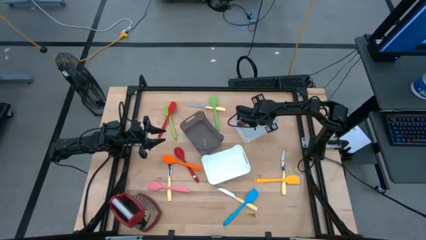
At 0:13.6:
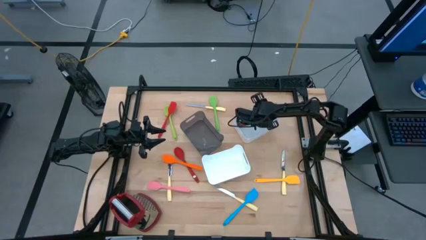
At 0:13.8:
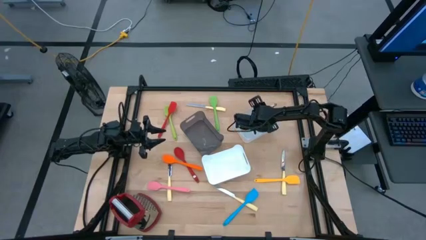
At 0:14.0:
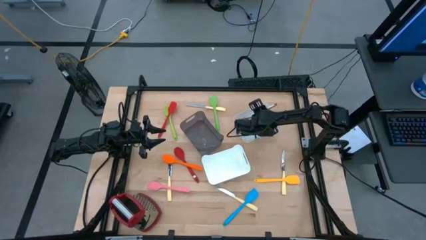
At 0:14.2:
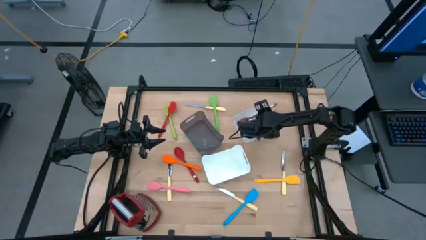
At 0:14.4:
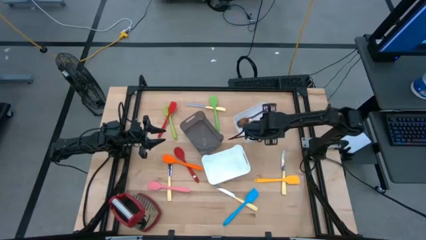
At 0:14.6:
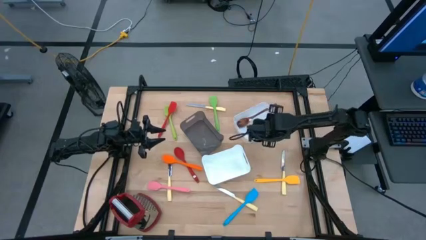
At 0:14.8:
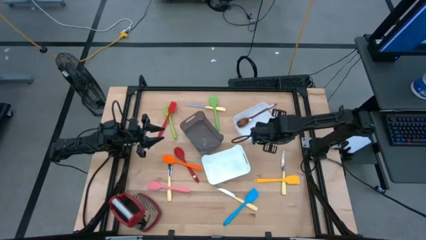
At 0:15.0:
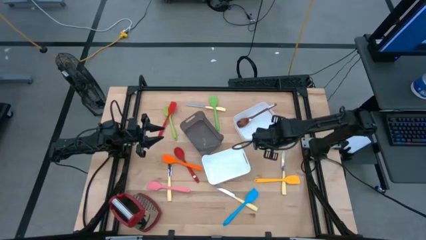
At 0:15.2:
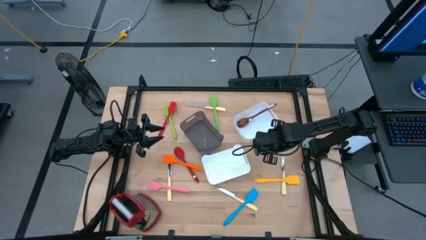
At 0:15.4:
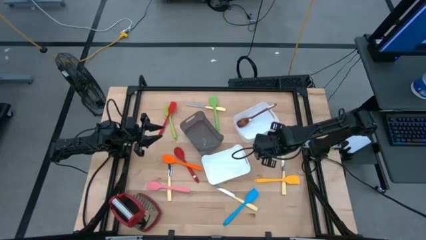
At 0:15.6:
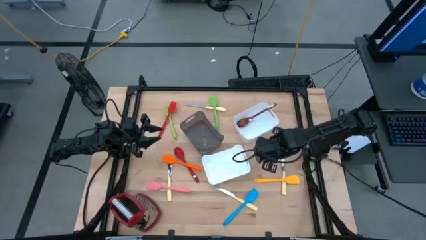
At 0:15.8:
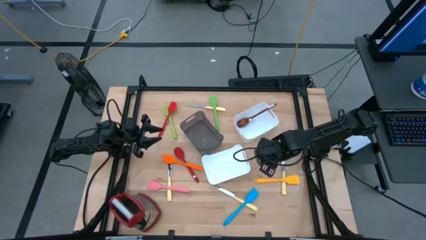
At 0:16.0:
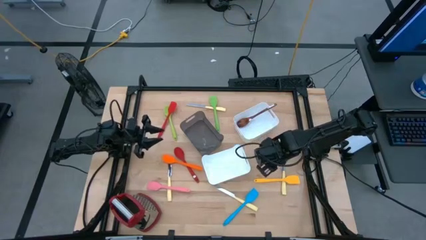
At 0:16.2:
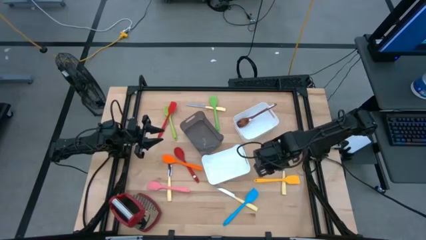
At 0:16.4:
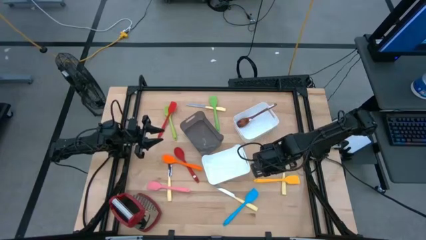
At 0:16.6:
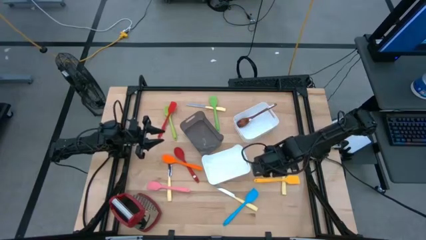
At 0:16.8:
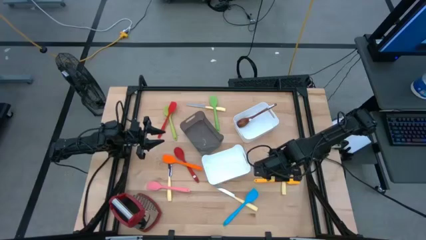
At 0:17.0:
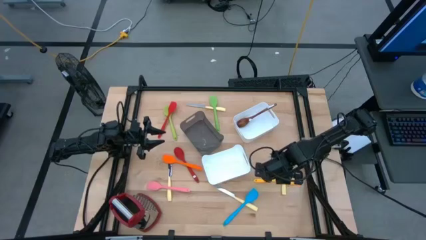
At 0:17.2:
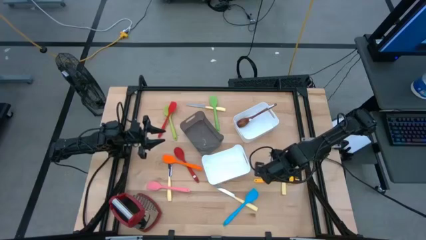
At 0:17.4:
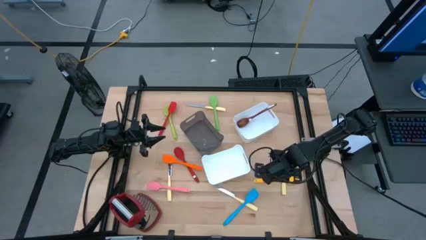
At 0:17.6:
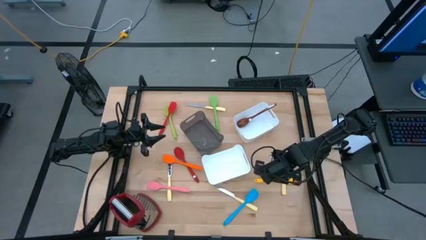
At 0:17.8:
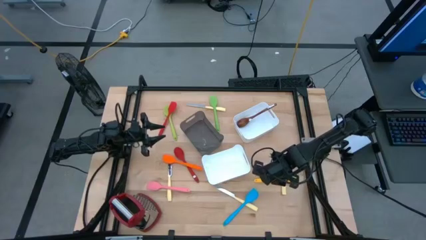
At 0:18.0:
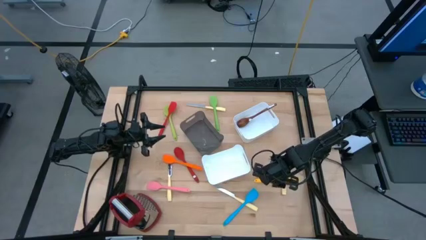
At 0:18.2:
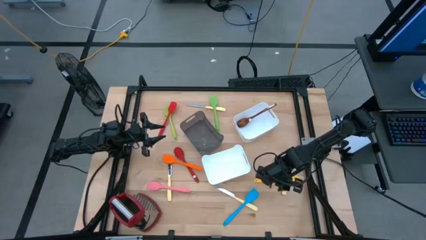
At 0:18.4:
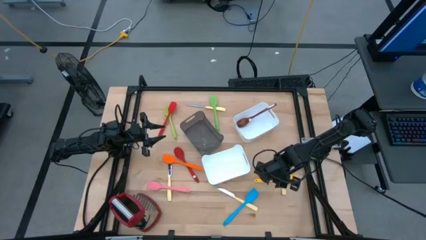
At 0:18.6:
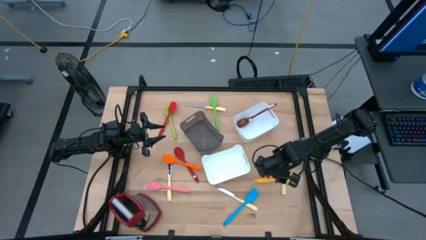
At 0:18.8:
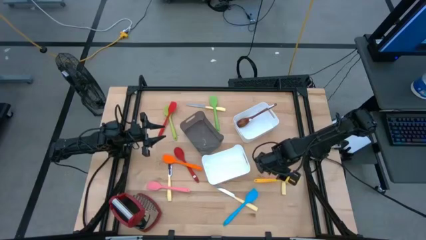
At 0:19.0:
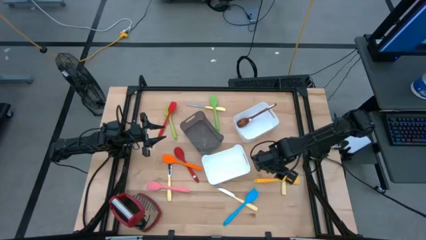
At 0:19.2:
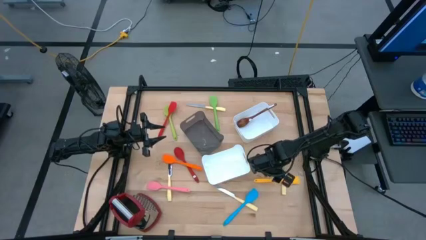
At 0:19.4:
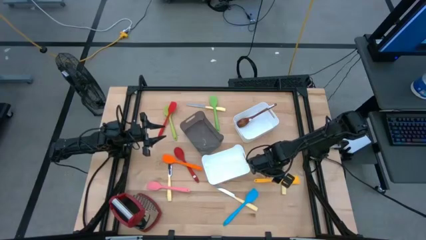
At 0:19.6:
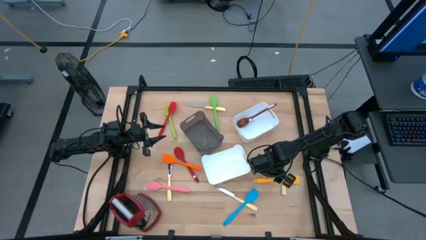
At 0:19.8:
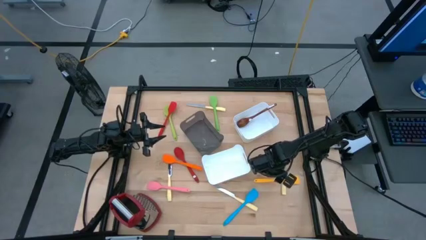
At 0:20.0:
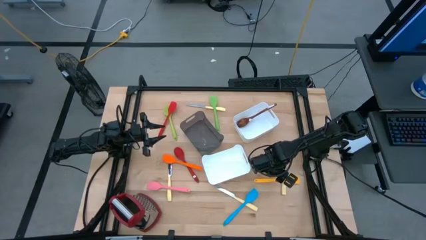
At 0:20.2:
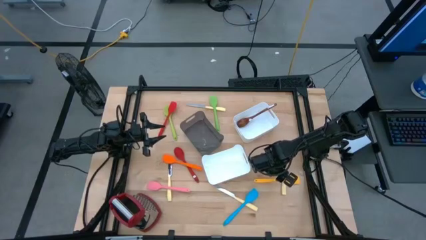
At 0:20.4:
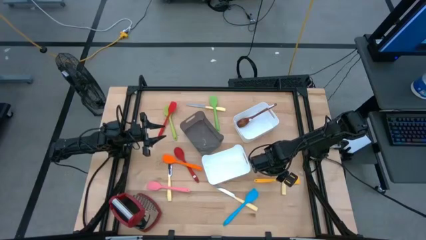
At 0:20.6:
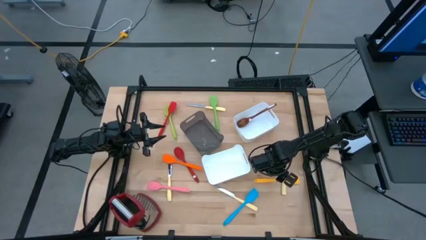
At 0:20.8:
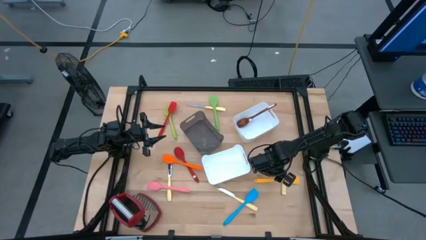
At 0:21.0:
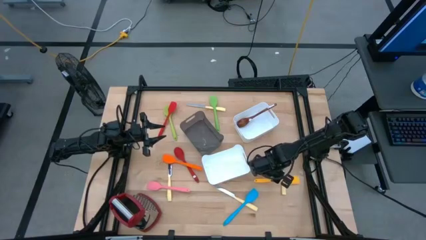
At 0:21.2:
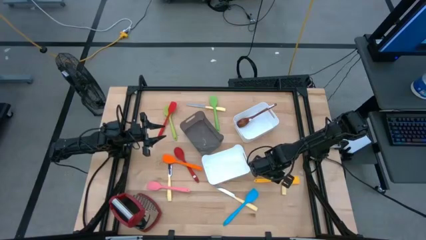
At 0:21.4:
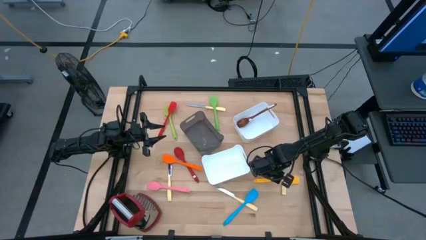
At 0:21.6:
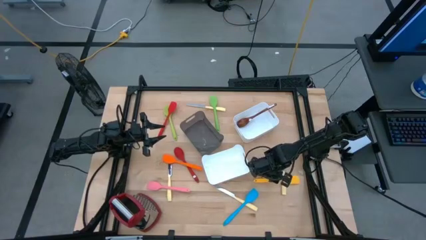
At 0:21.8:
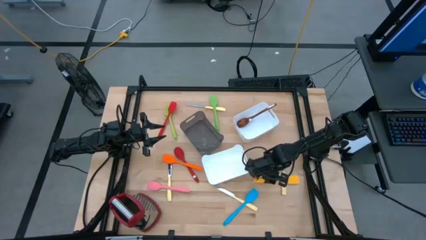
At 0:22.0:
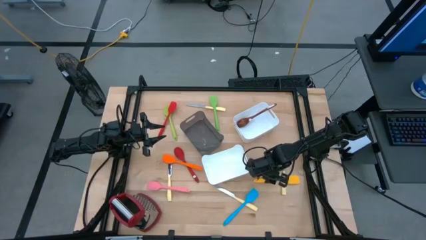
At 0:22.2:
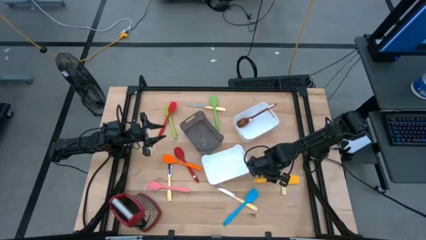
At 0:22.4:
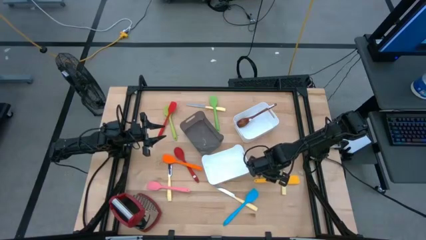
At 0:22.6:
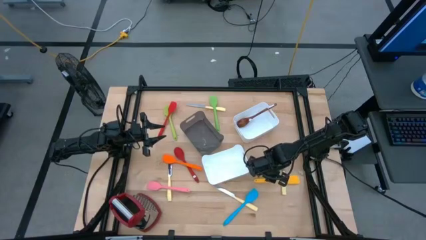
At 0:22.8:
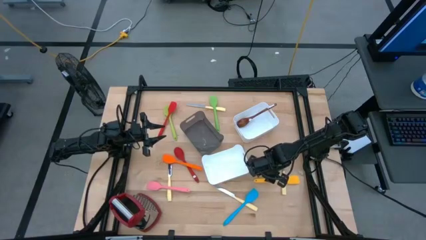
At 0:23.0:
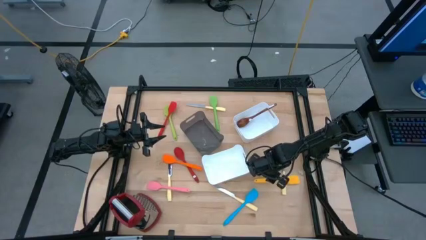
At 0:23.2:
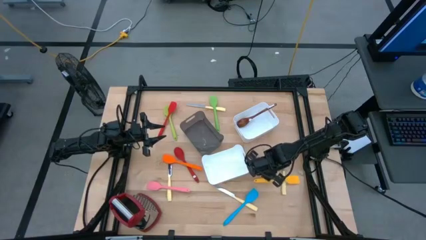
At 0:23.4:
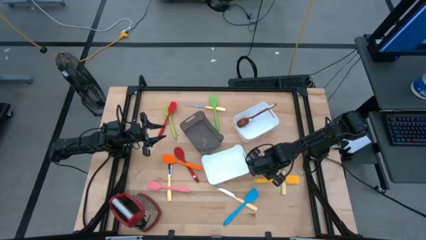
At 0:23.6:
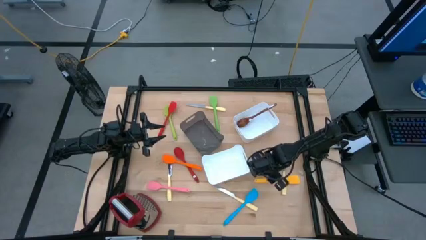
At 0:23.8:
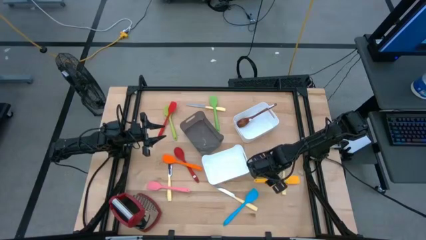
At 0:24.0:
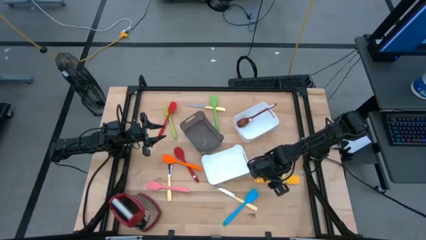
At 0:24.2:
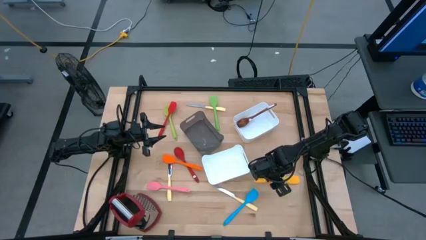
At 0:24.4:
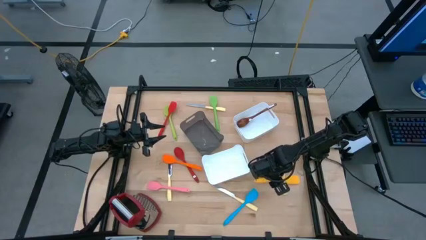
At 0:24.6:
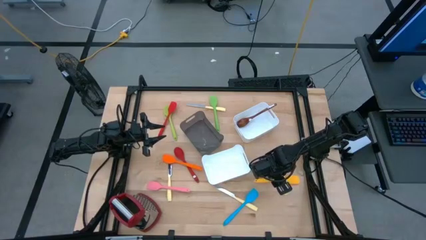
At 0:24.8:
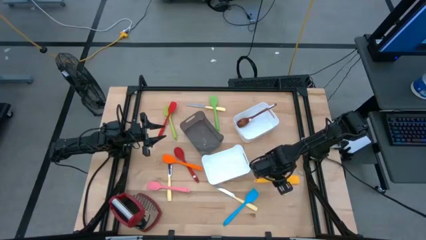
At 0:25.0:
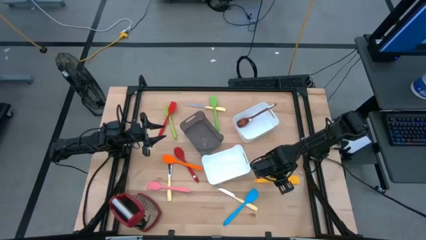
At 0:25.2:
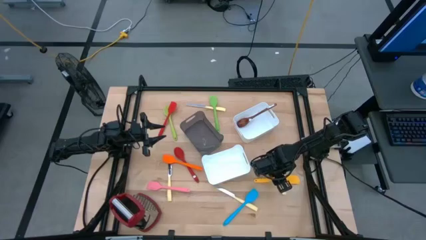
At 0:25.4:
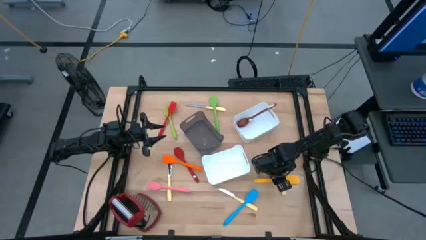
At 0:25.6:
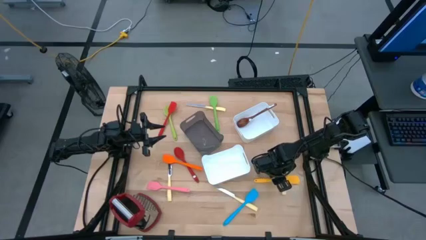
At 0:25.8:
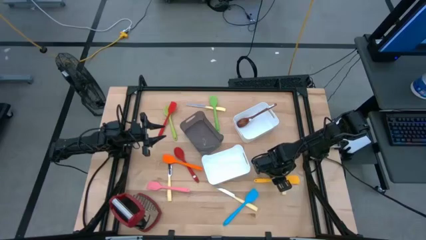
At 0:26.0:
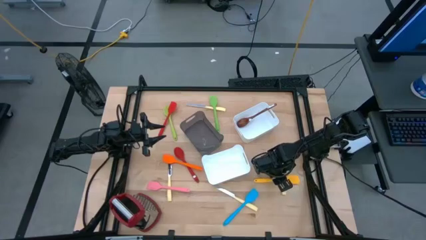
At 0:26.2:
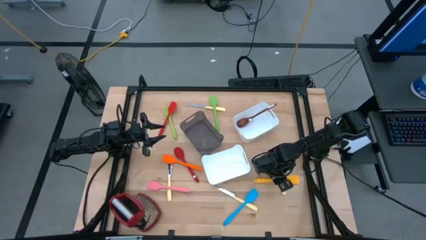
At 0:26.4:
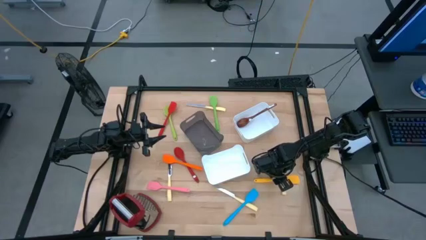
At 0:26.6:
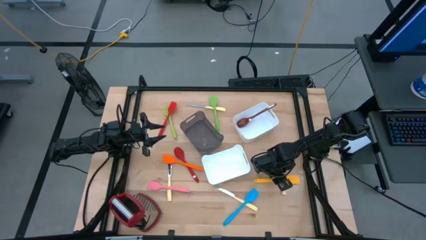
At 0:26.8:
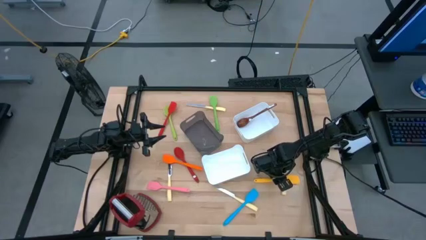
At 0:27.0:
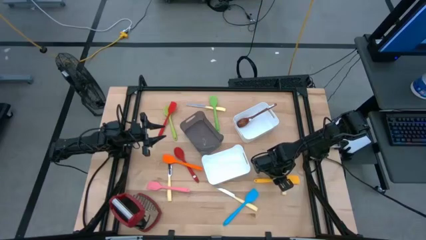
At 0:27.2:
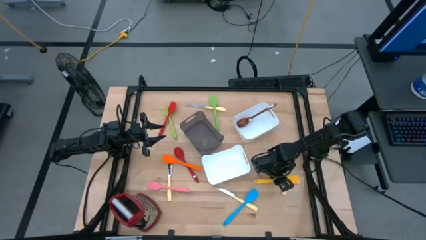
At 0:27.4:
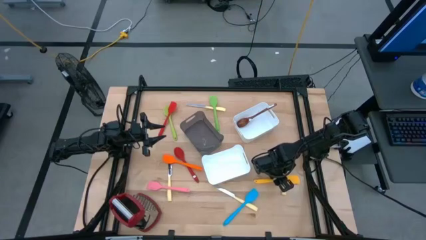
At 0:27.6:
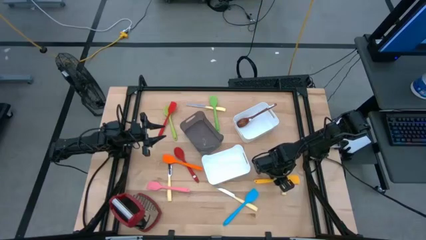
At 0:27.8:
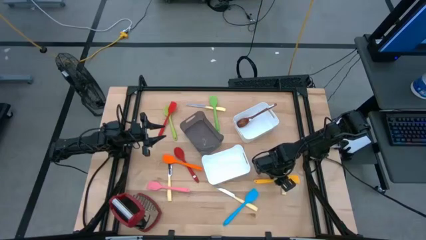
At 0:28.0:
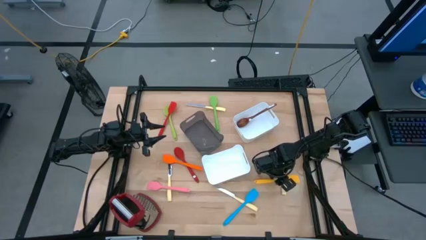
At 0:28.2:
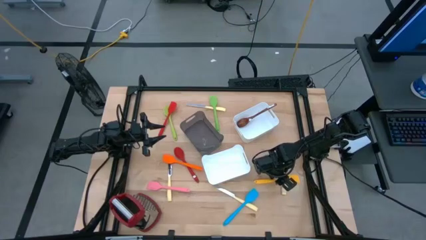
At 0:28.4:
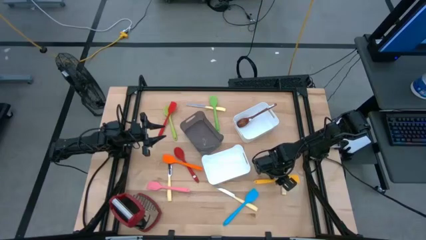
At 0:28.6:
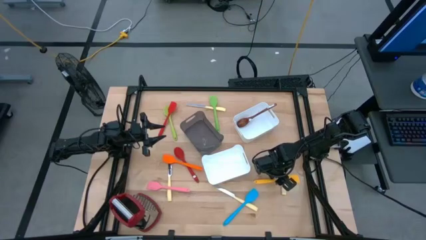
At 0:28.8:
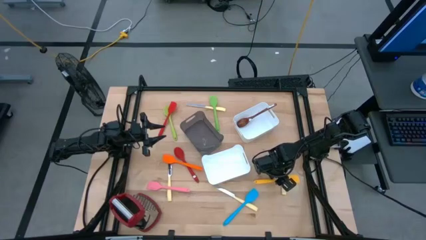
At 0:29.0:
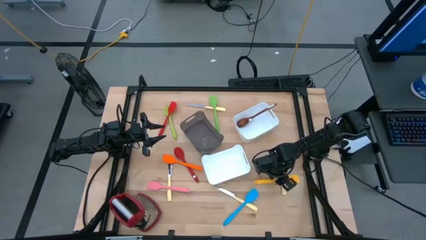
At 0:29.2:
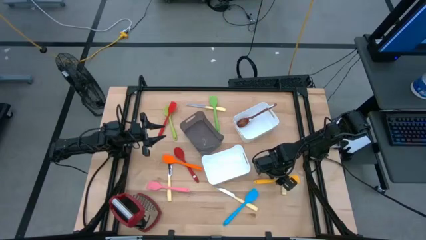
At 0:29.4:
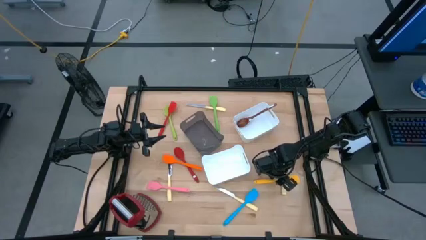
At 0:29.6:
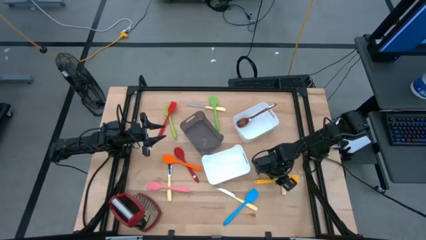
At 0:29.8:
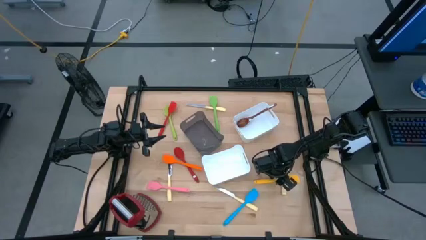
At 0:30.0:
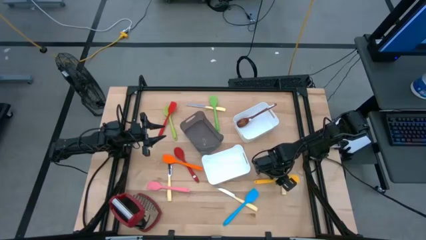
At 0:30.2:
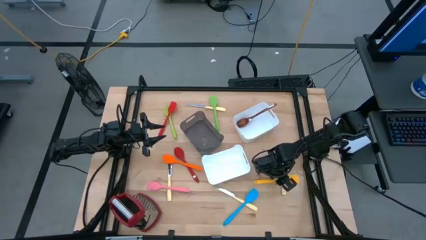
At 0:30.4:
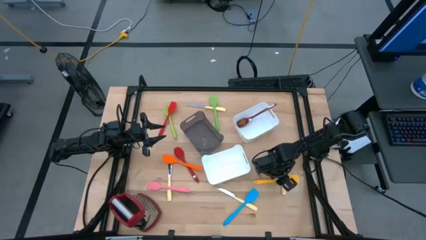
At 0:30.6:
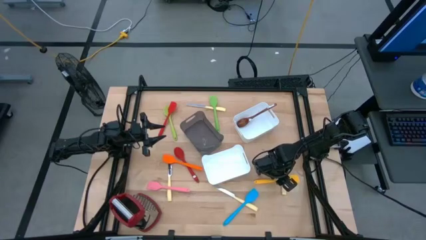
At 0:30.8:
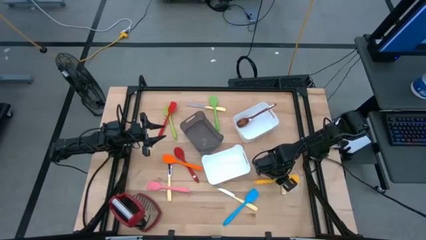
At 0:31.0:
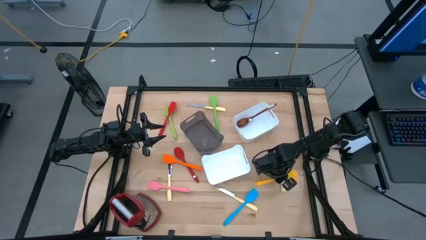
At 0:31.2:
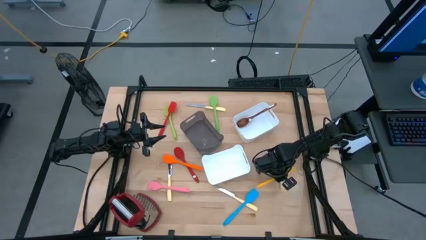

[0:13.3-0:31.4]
Task: Pick & Place Kitchen Items
Put the yellow spatula into the bottom white bin
